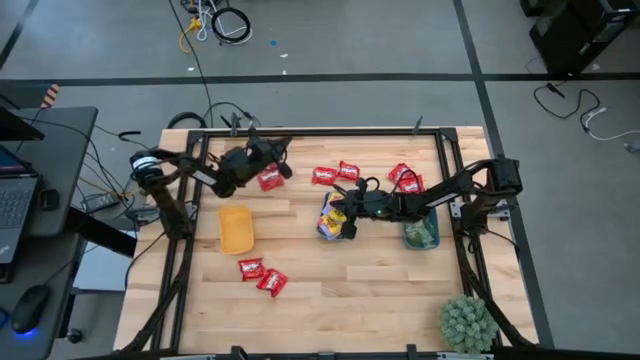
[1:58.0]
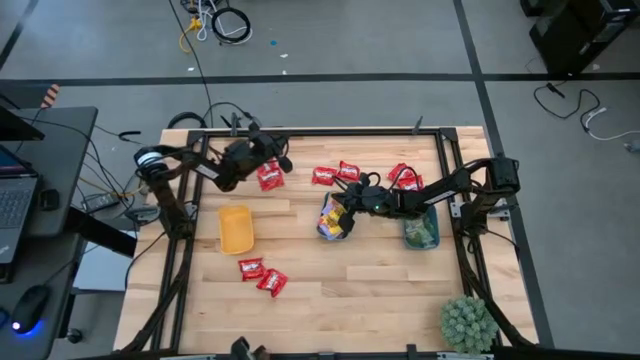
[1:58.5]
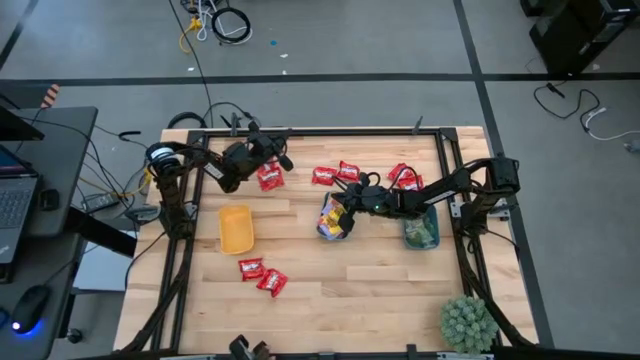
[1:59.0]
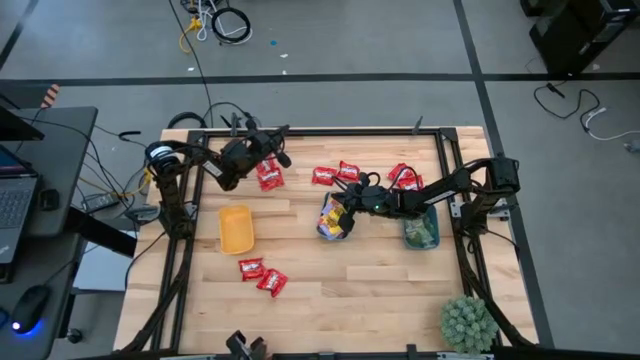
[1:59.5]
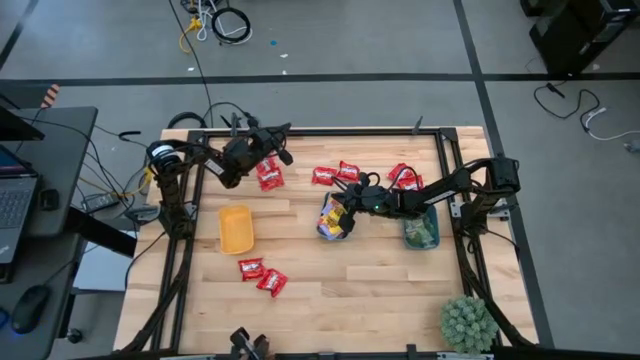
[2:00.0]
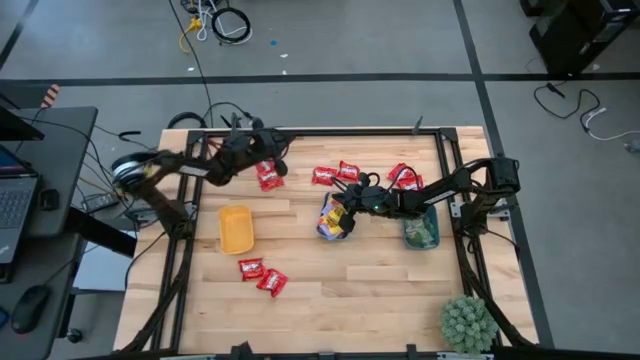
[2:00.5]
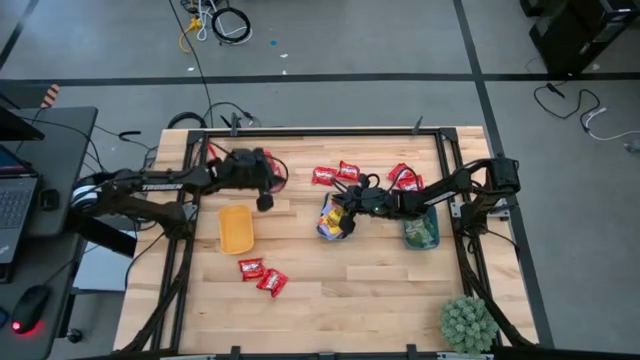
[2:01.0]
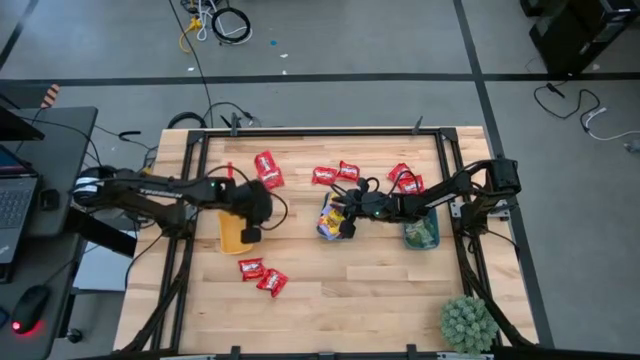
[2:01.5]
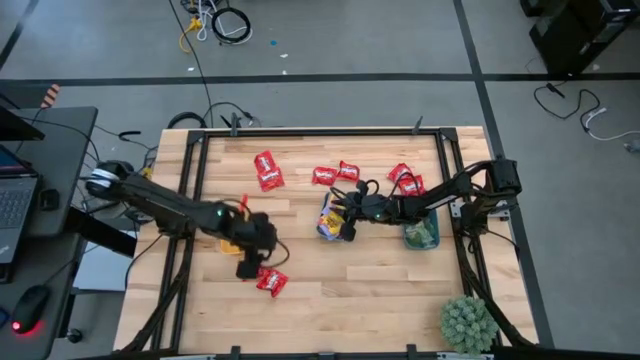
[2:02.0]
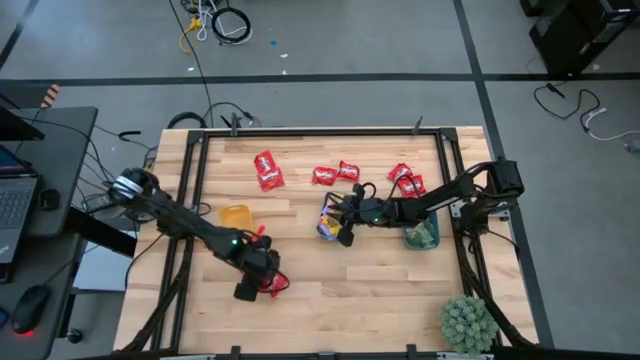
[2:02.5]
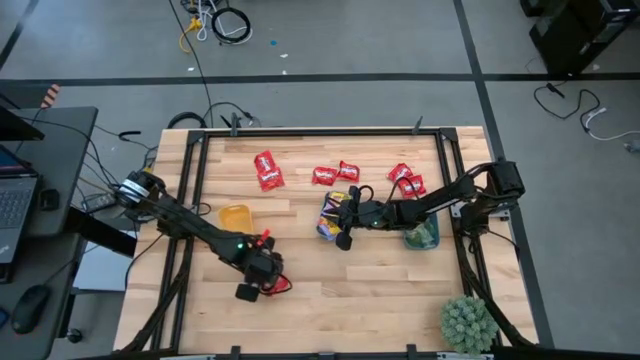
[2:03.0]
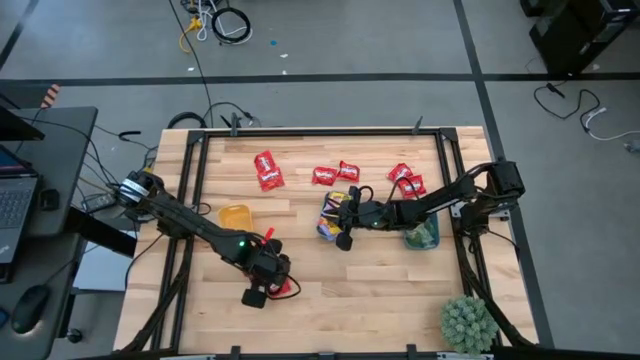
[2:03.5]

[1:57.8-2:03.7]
Task: Sort candy
Put the red candy pack into the yellow bin

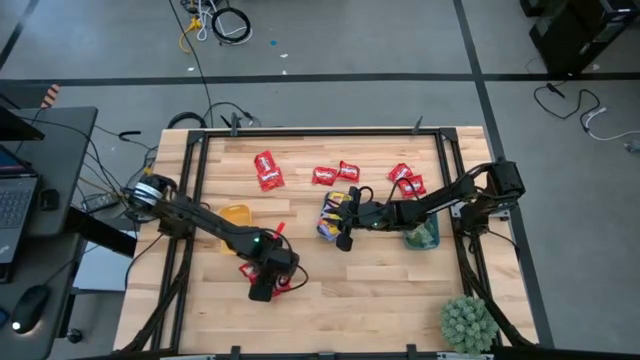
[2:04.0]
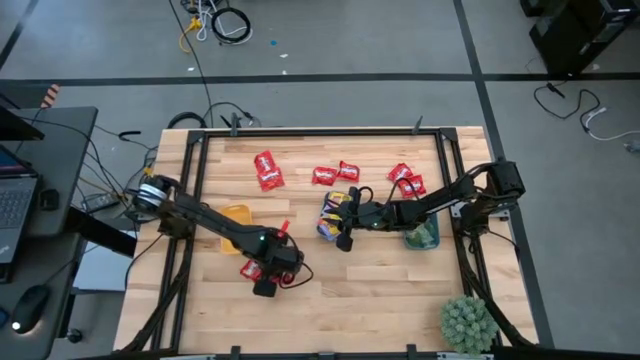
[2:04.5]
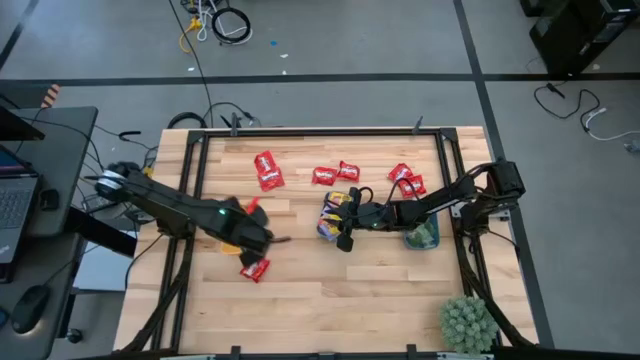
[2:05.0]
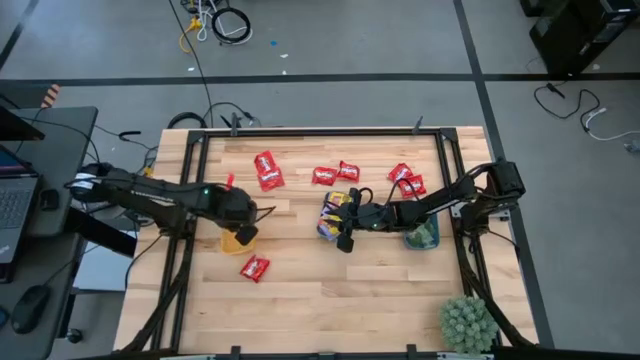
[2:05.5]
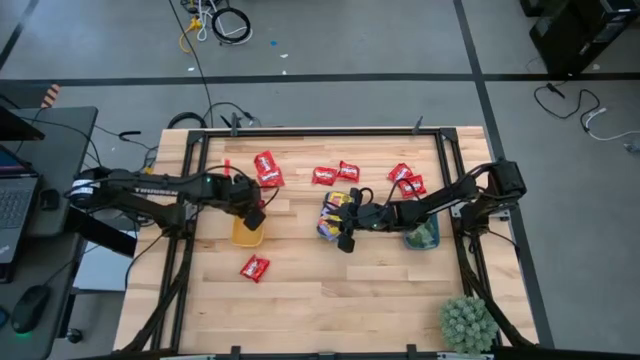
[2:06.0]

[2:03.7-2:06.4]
Put the red candy pack into the yellow bin

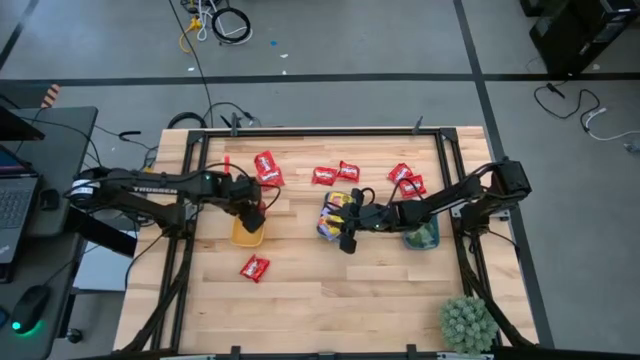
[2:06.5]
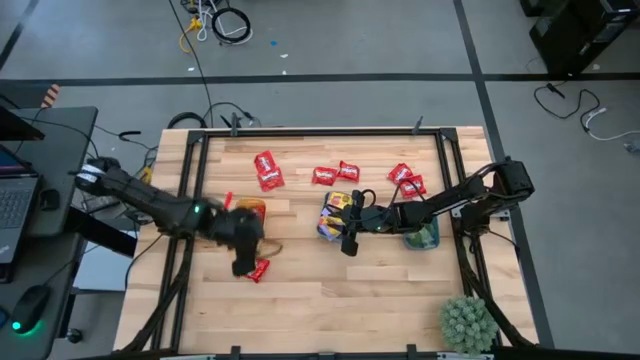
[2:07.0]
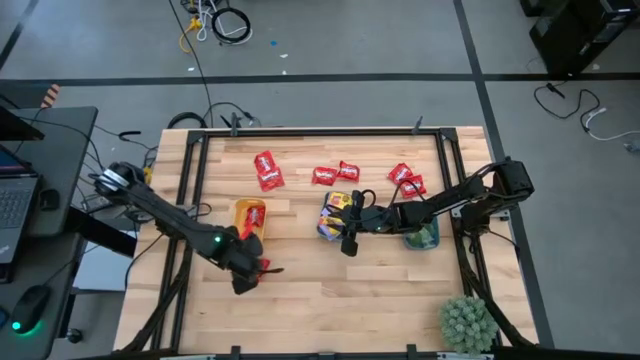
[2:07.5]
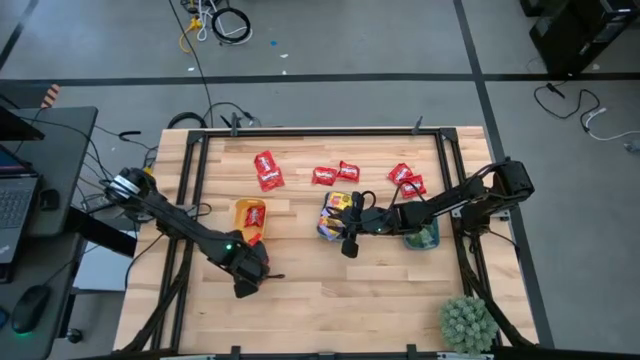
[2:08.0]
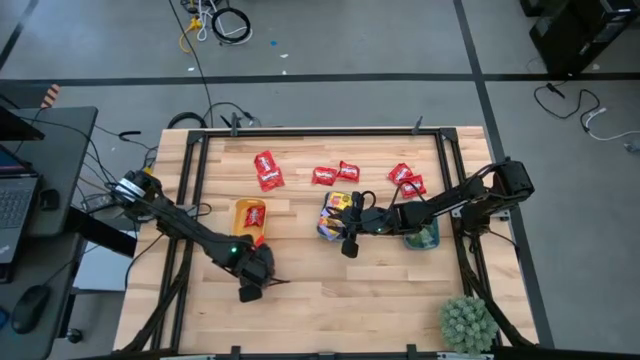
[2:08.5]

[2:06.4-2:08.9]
Put the red candy pack into the yellow bin

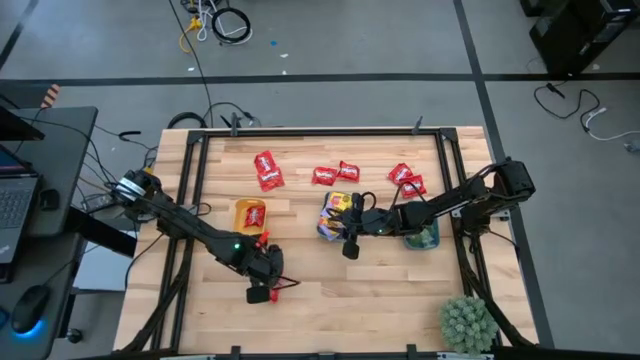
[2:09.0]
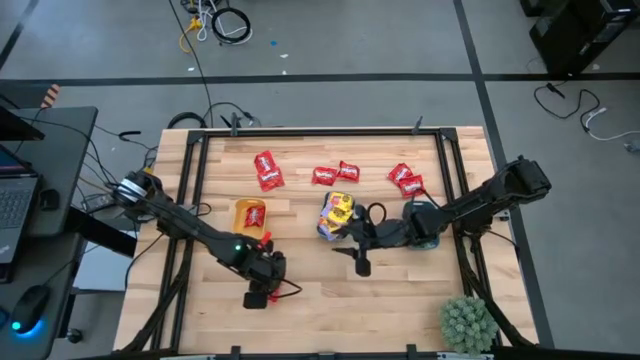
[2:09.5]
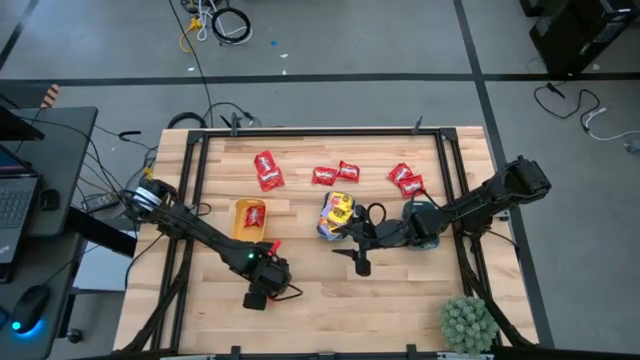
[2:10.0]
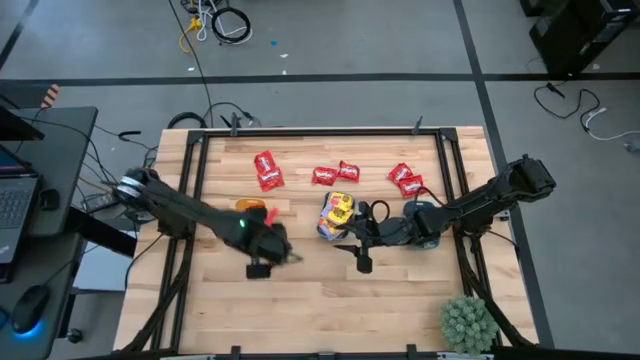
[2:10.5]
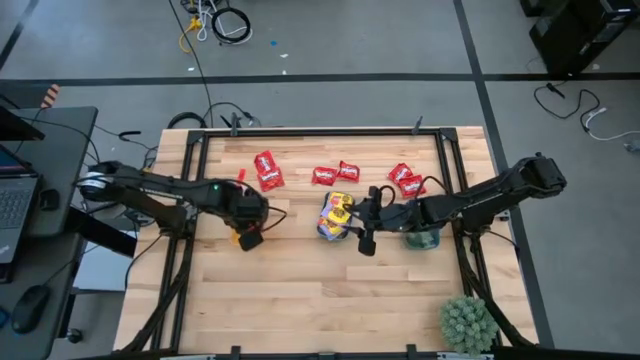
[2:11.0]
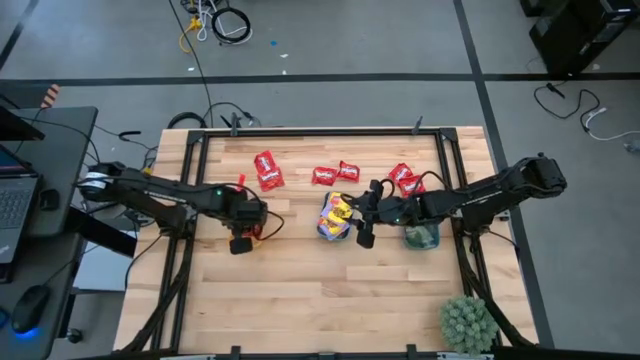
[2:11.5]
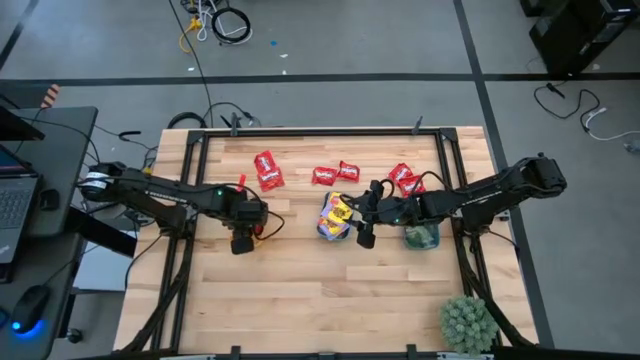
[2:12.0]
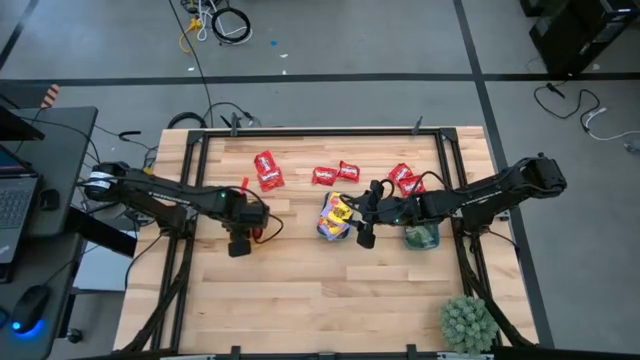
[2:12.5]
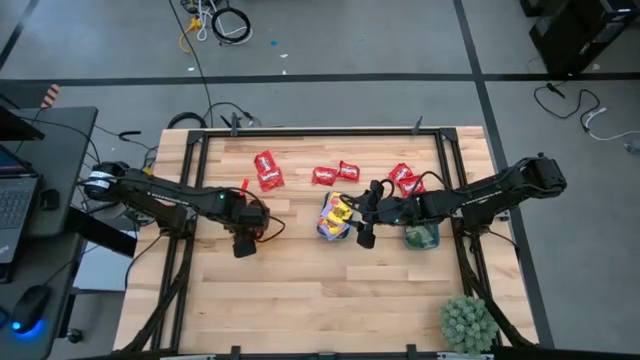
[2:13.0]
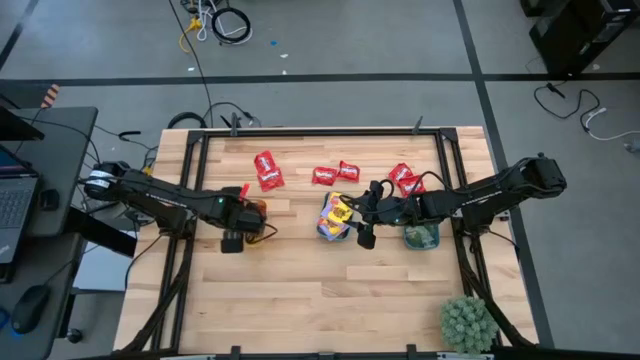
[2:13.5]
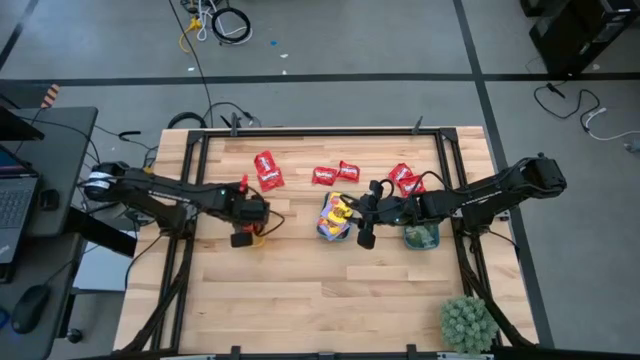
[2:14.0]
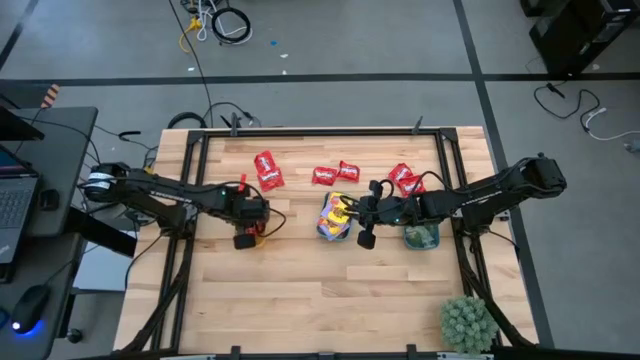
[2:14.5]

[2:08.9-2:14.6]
Put the red candy pack into the yellow bin

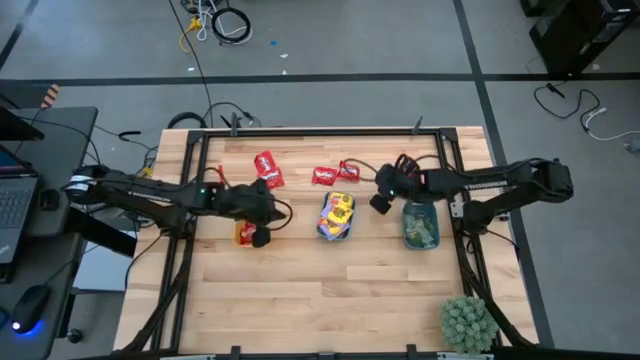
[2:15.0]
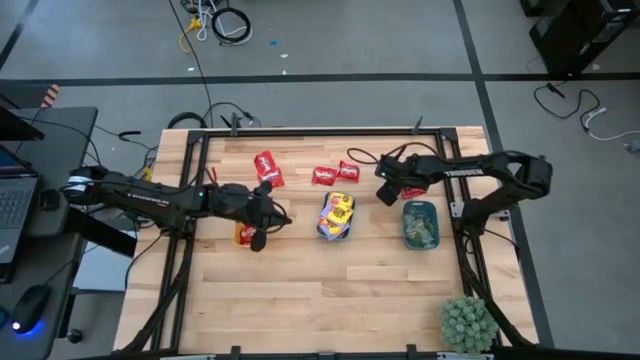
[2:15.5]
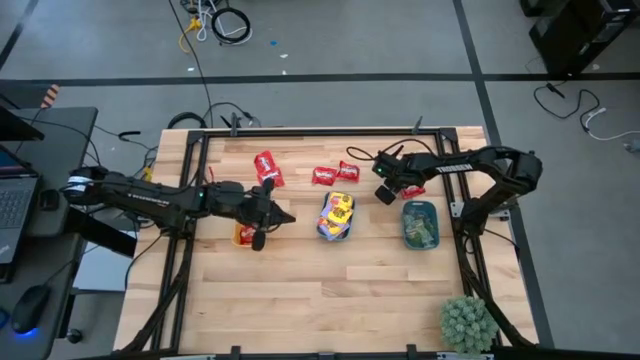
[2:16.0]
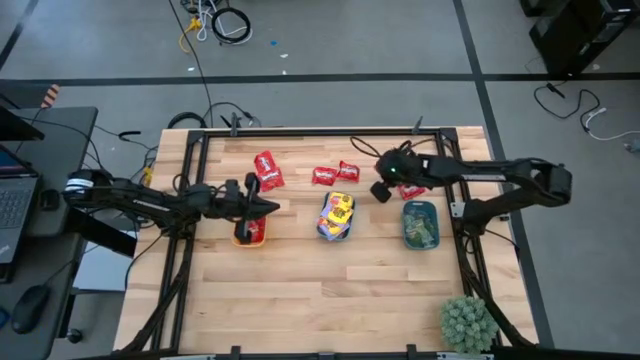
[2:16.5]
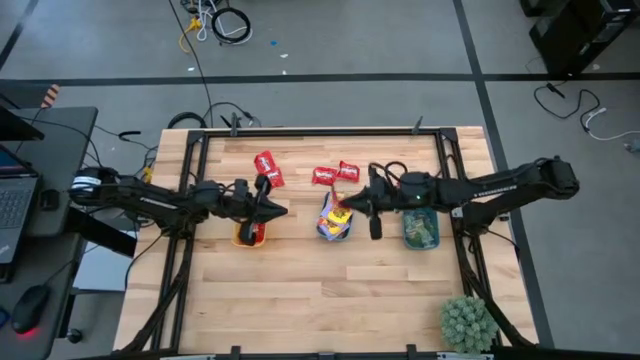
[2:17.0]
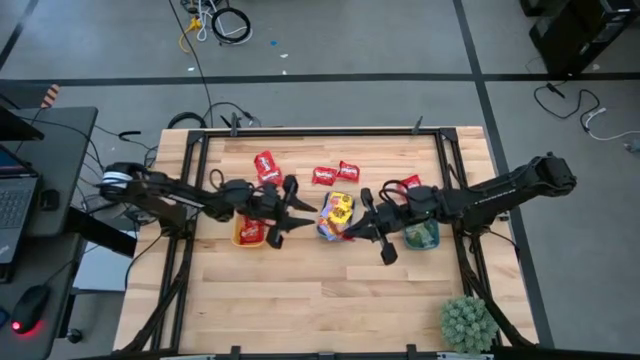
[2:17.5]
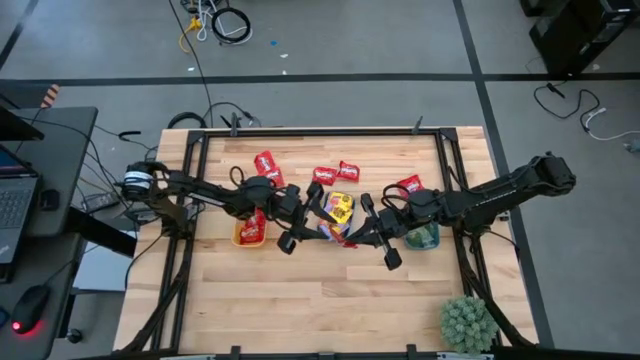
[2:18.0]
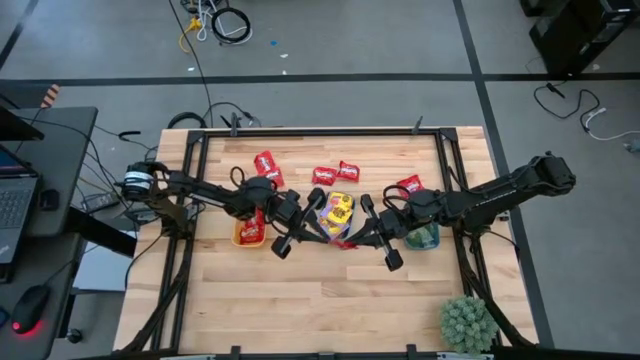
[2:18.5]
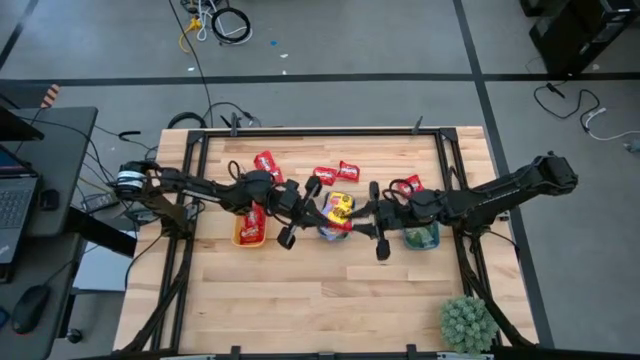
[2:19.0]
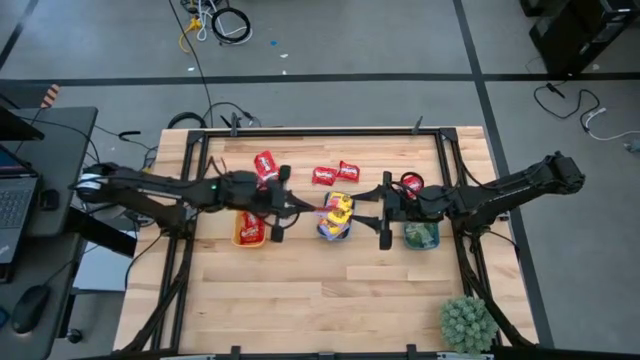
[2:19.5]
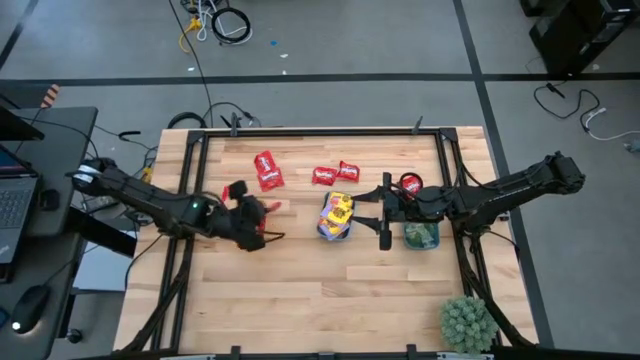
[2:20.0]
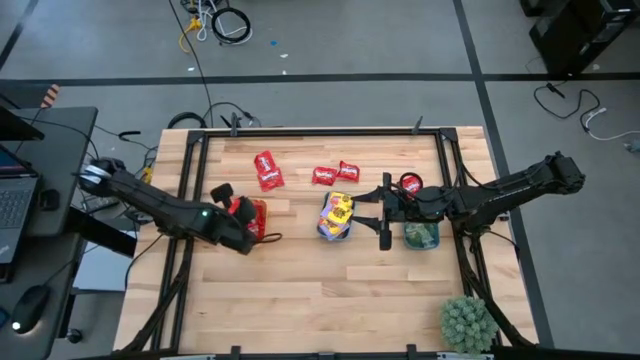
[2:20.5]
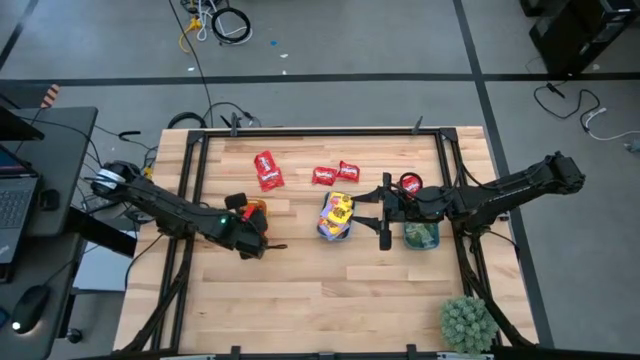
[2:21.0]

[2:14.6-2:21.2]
Put the red candy pack into the yellow bin
